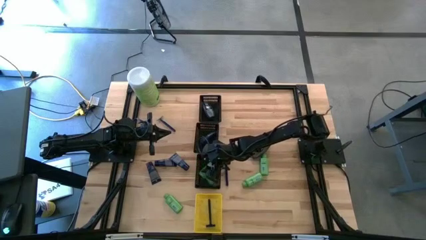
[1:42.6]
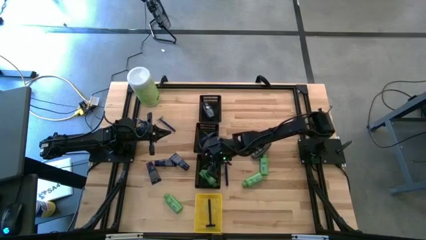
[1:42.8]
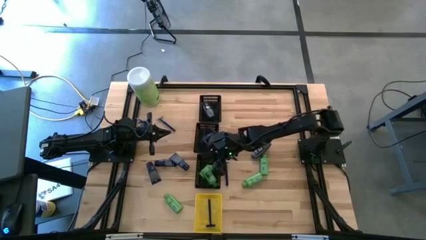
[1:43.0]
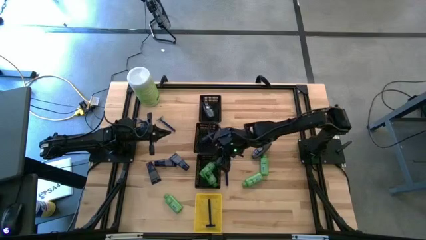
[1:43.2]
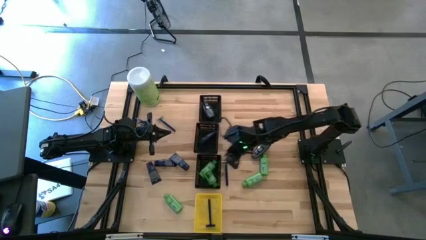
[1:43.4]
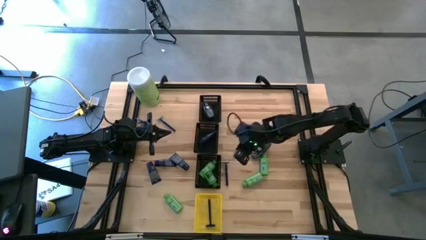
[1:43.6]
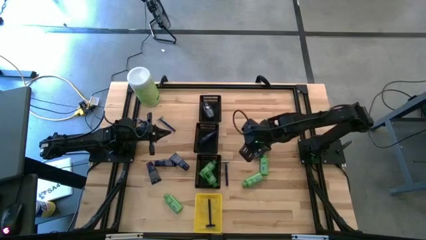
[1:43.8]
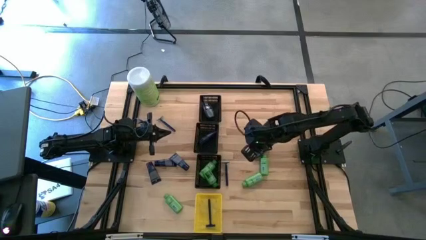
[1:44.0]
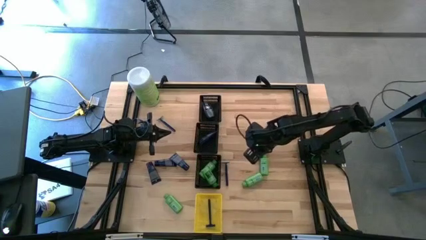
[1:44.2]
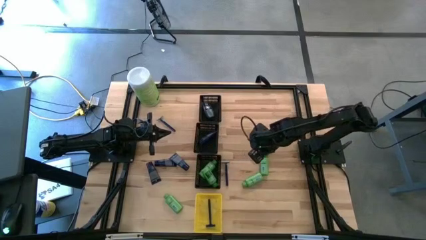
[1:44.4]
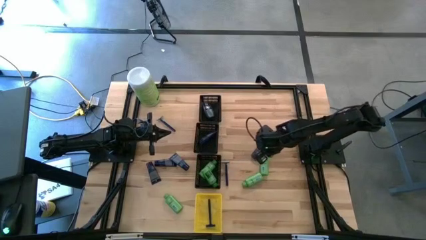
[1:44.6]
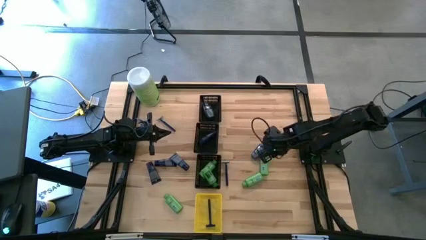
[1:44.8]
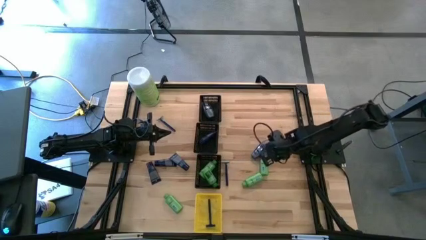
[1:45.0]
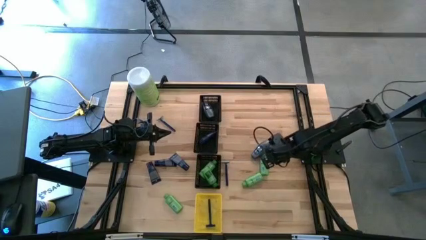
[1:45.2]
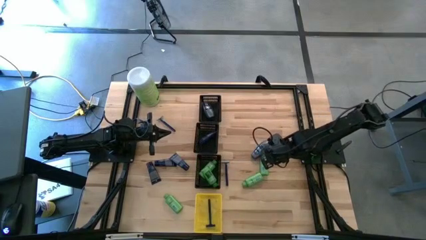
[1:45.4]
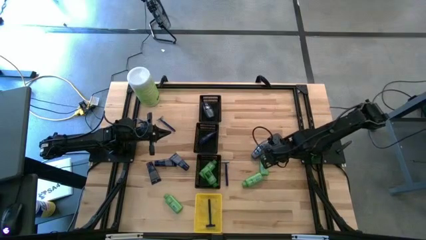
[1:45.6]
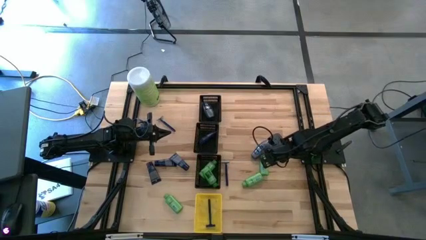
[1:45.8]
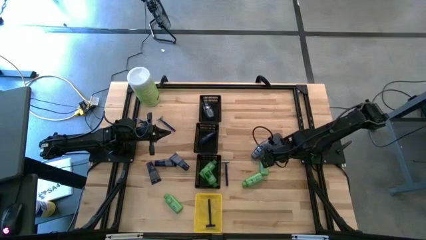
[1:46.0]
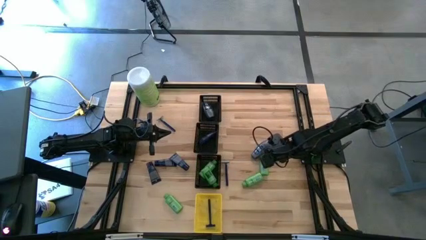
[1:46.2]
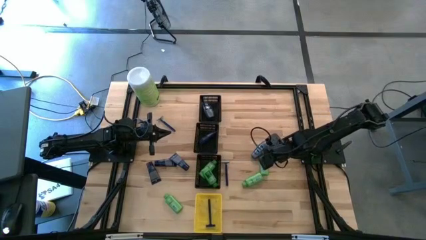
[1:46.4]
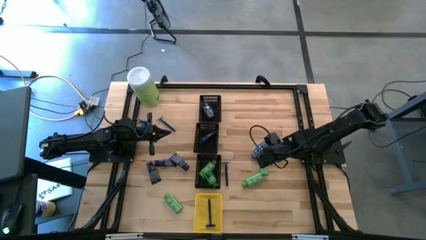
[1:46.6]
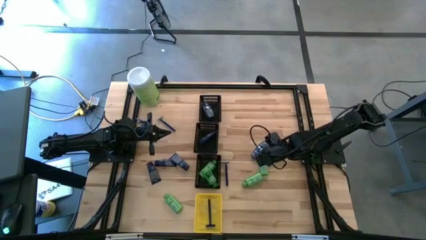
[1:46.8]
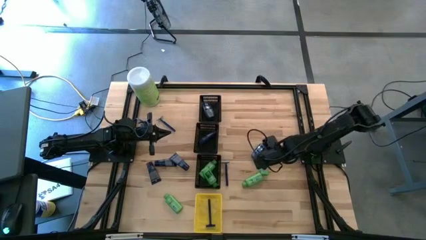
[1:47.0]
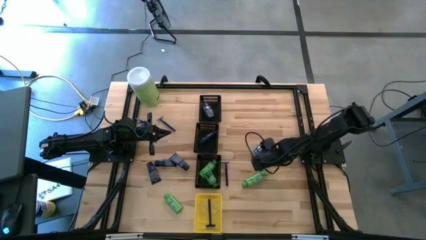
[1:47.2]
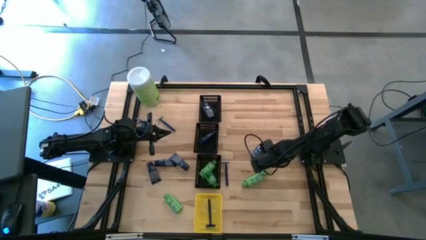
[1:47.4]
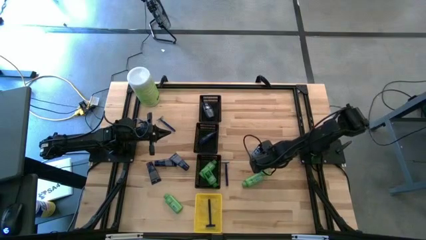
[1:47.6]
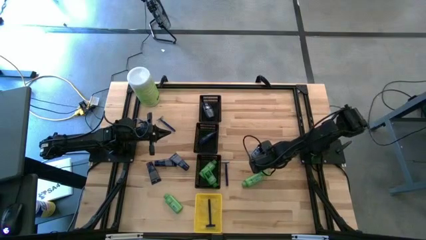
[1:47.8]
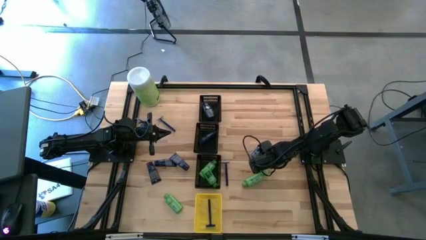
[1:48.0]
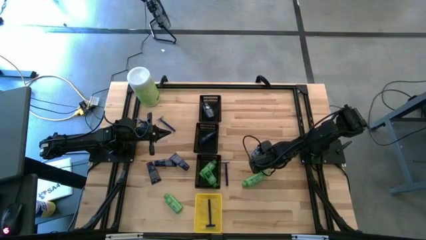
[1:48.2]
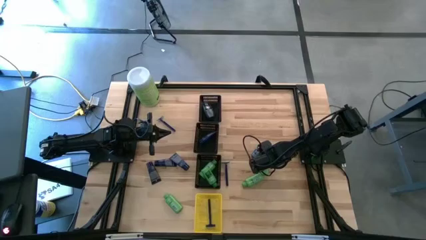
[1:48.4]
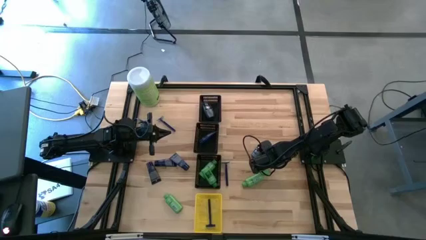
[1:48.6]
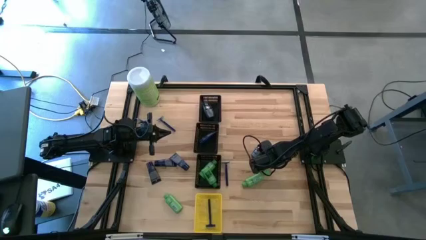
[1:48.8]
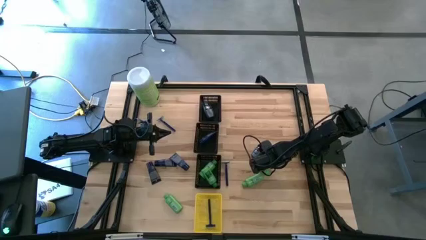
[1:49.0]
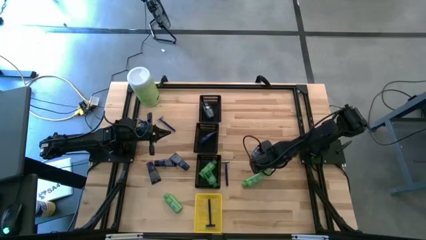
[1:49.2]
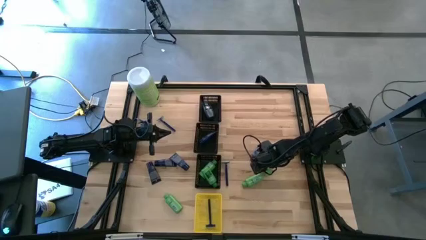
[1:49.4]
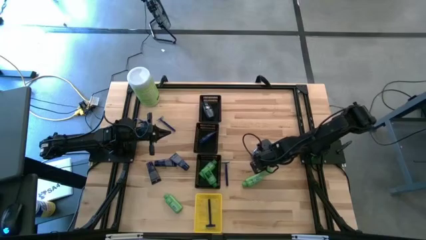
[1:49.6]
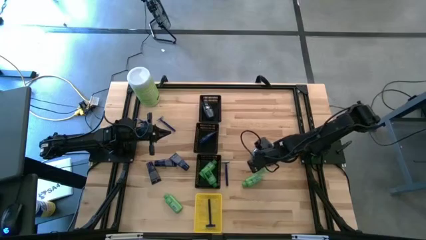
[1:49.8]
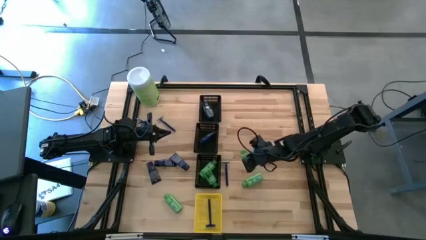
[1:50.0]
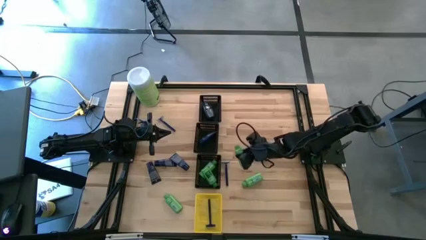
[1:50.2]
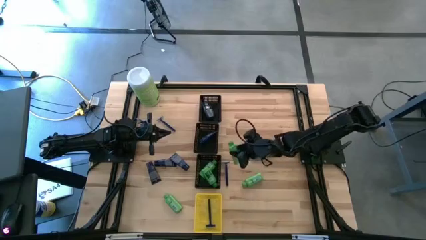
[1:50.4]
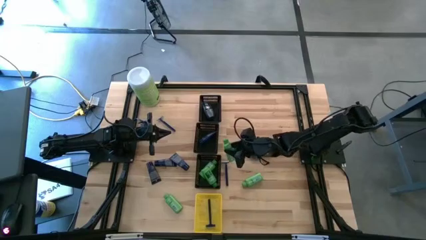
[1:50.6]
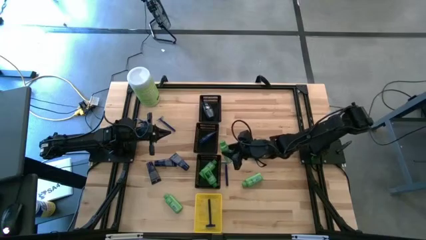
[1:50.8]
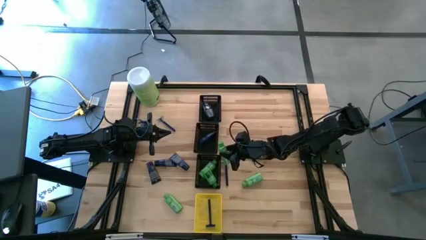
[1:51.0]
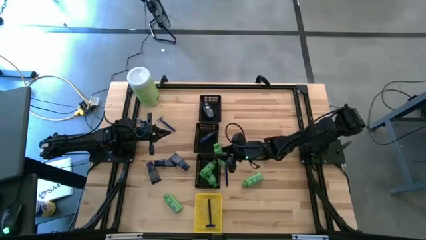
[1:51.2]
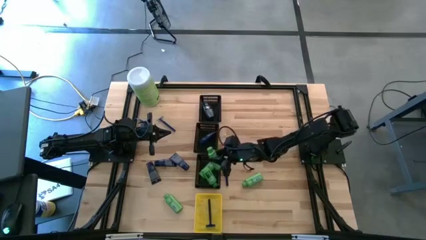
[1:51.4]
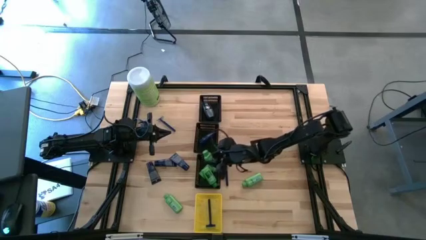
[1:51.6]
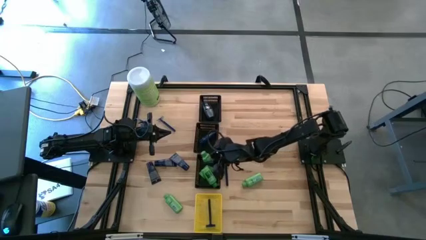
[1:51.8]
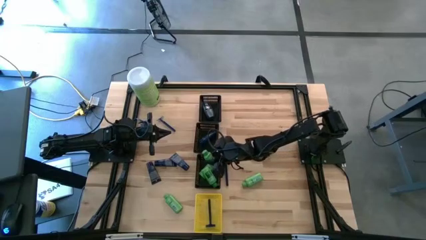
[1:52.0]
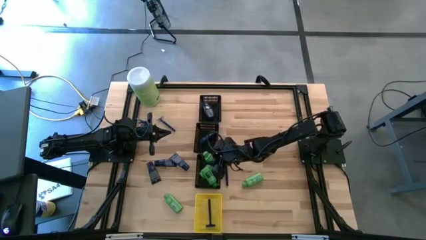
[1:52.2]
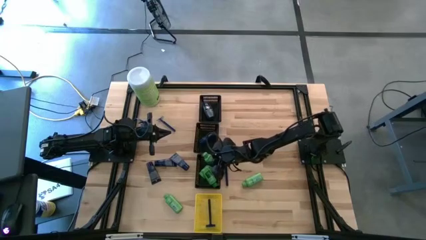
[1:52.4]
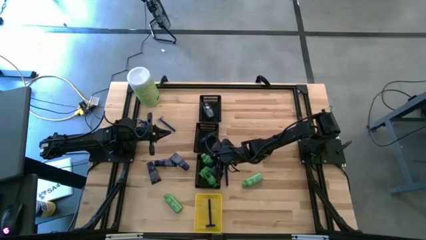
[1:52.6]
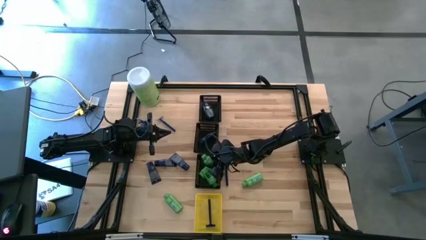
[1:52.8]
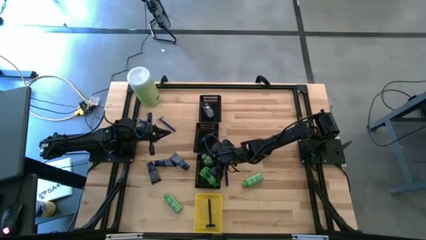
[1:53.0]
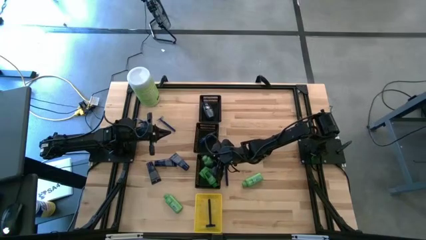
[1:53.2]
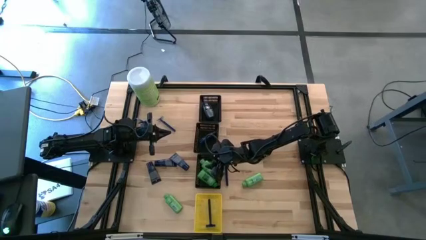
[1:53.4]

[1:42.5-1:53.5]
Task: Pick & Place Travel size toiletries
Put the green shampoo bottle into the bottom black bin

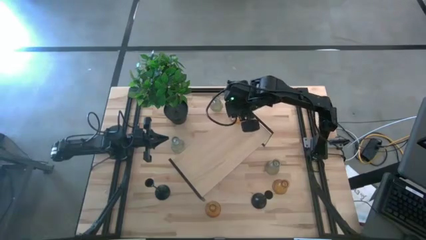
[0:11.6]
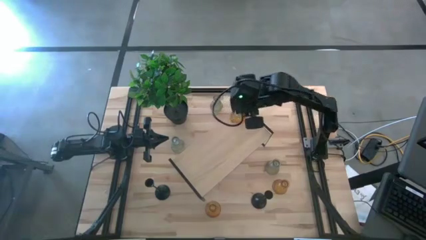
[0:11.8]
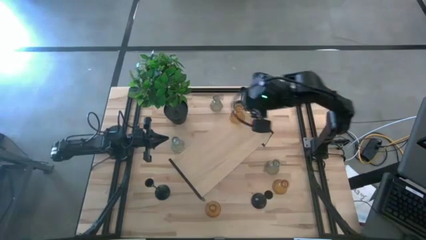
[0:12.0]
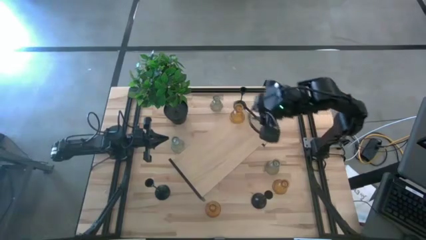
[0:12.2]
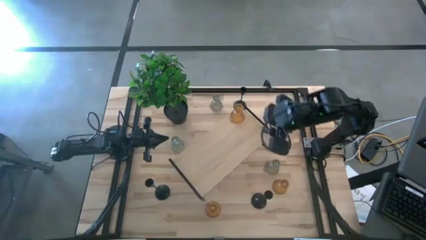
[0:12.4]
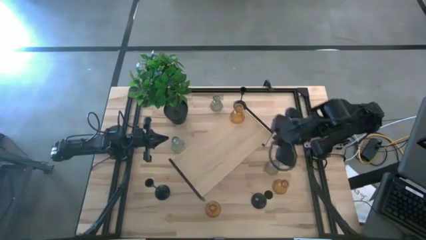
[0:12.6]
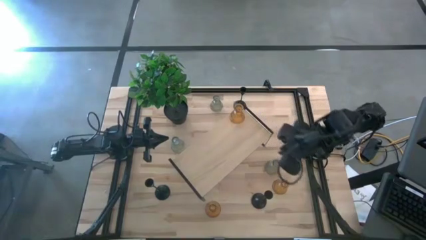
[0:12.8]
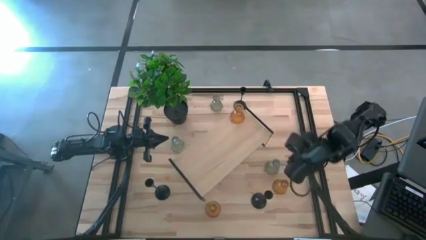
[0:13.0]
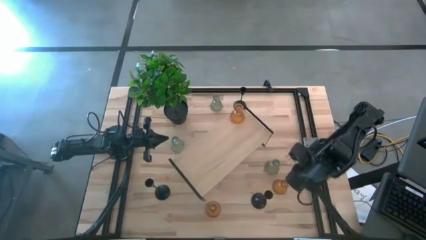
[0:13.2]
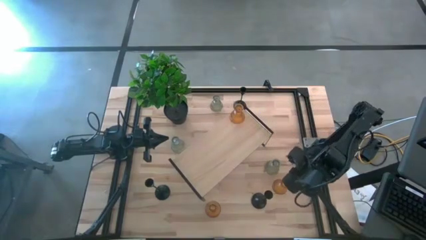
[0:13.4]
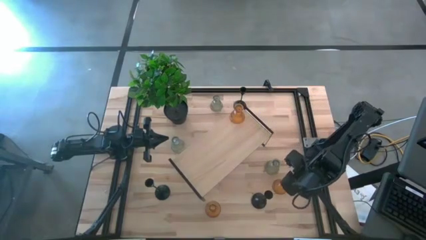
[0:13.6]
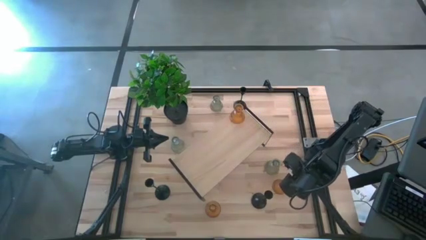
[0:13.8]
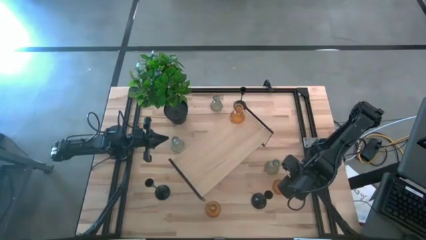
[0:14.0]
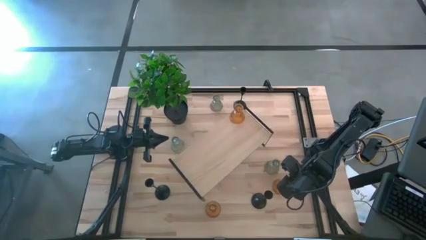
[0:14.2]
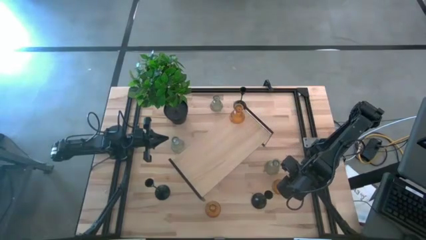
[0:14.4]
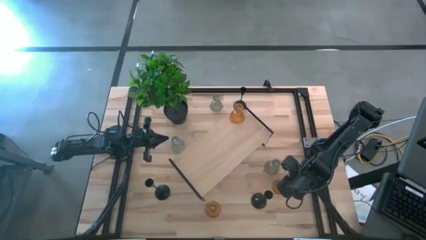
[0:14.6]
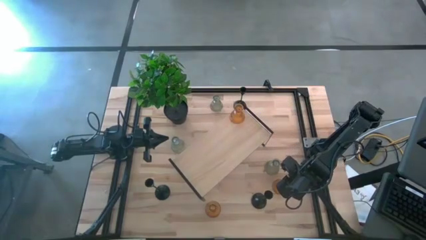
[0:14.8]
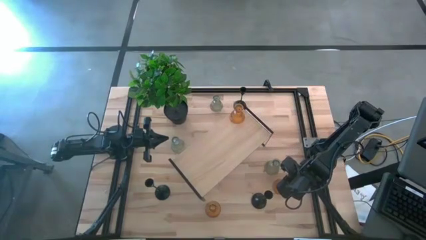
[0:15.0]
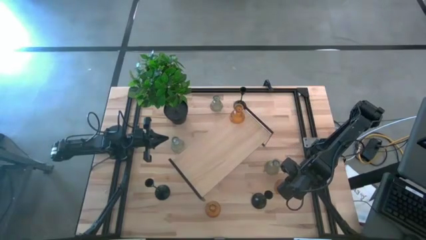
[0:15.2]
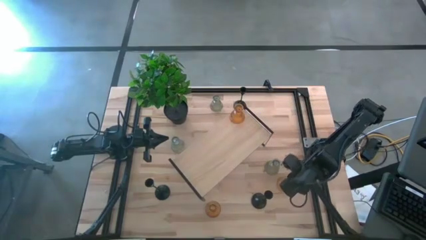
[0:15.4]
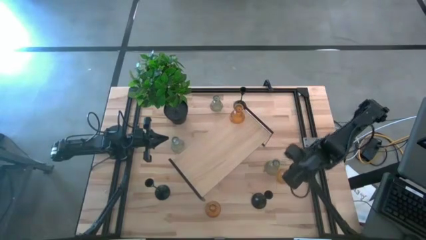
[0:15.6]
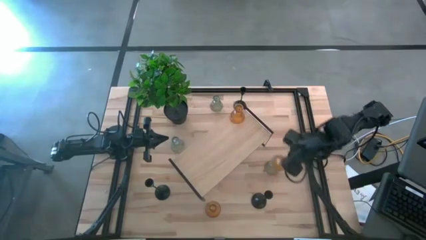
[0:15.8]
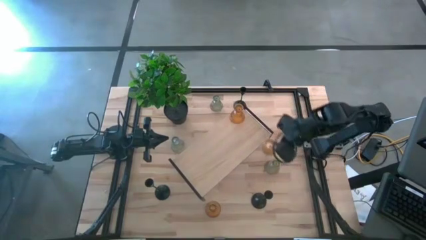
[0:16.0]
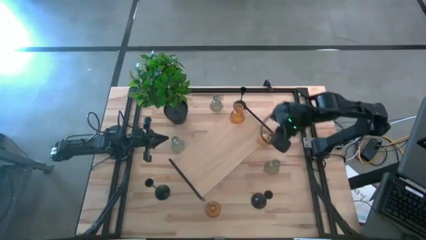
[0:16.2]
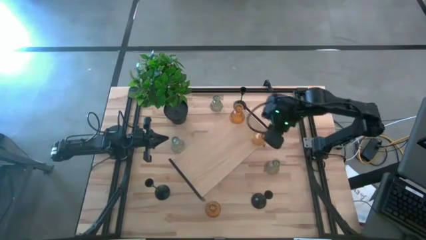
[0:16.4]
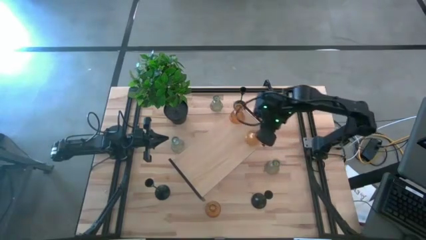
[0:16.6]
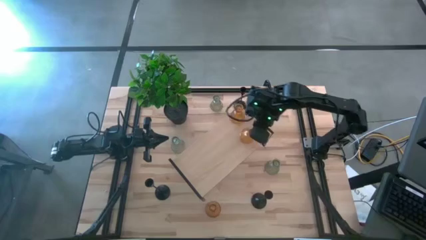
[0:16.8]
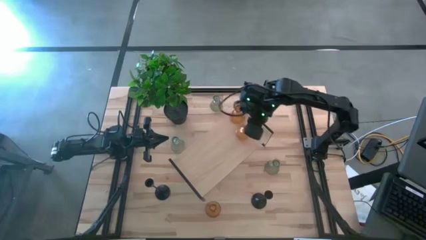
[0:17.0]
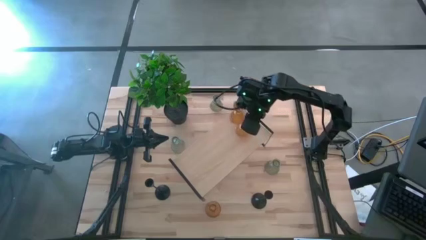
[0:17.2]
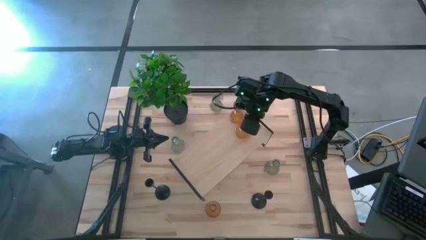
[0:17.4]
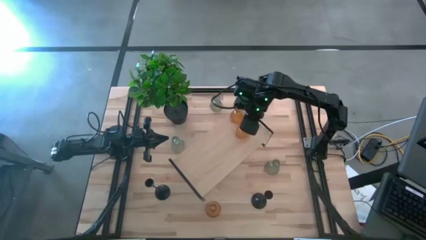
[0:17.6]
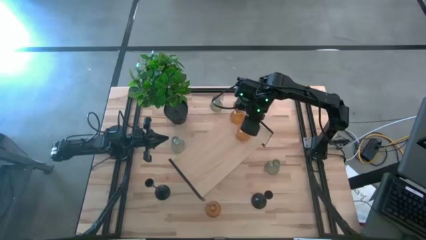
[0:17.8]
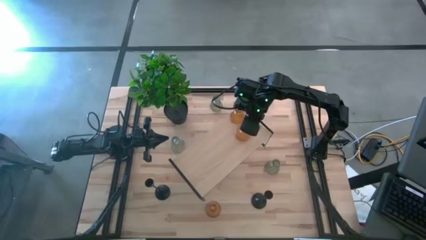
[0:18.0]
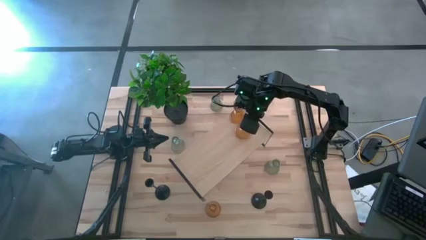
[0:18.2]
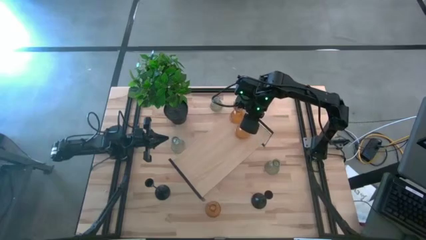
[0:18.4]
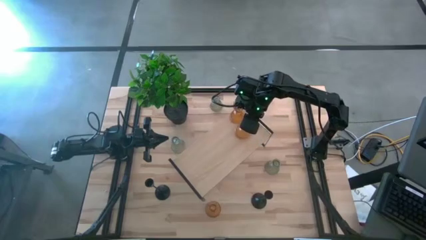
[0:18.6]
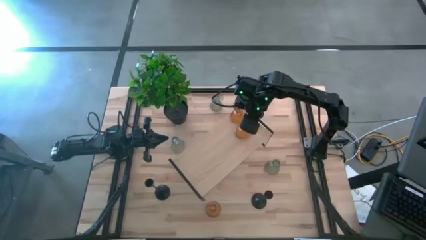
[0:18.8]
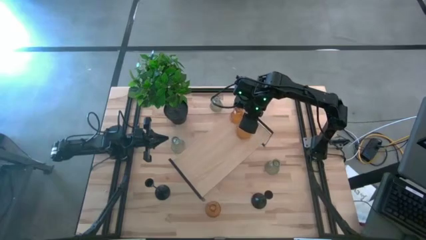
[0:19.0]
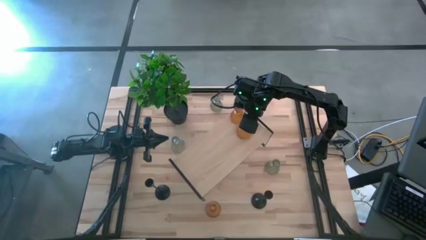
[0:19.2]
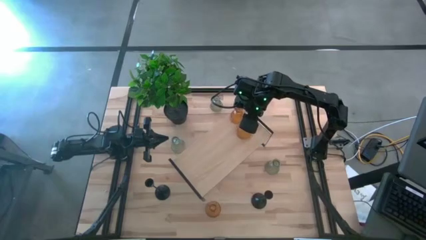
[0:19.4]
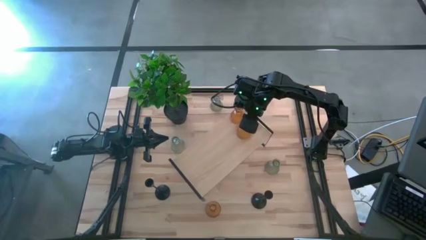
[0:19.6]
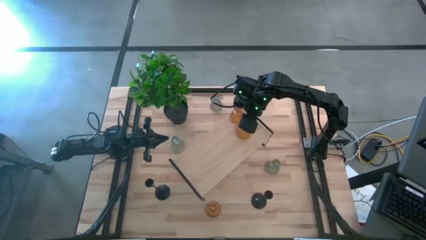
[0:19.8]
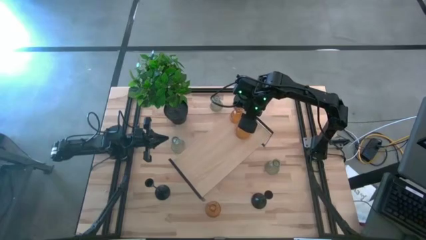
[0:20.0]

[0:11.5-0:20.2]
Task: Pick & Place candle stick holders
Put the right yellow glass candle holder on the shelf
